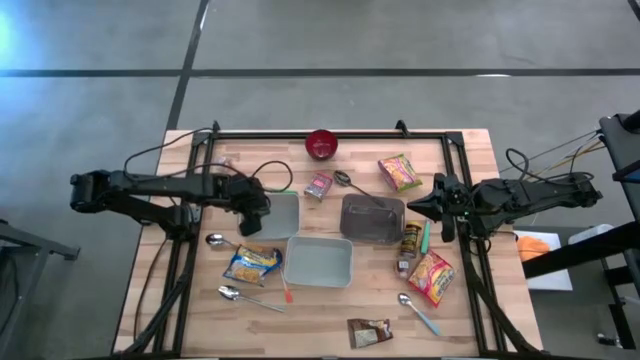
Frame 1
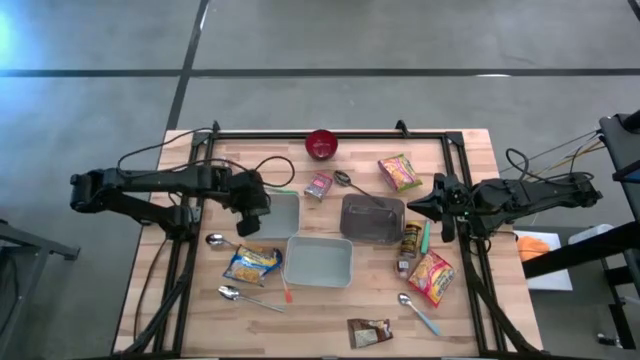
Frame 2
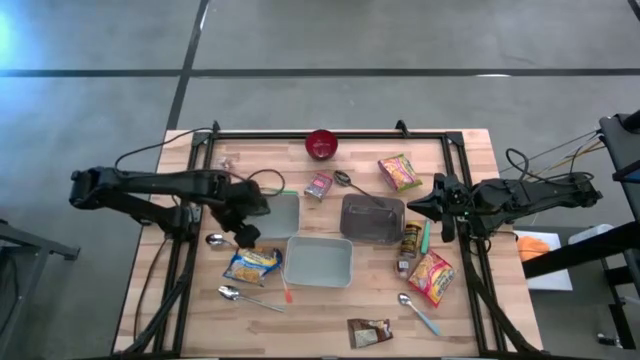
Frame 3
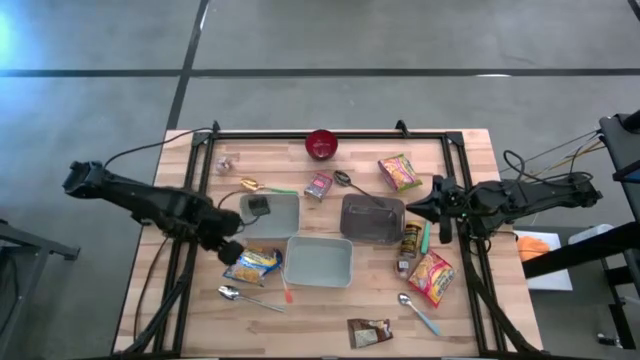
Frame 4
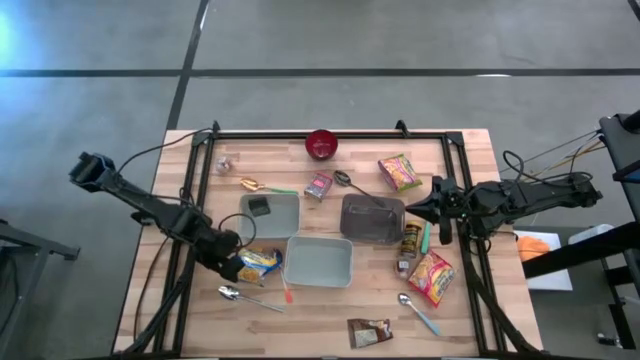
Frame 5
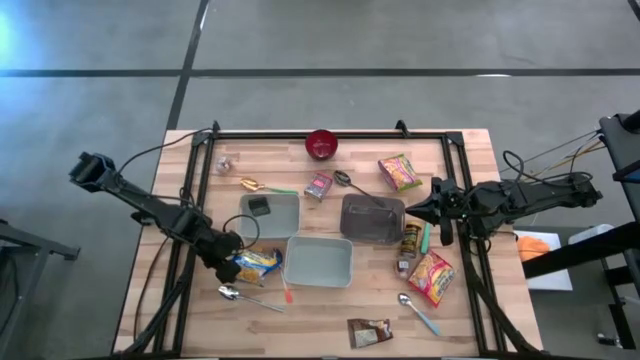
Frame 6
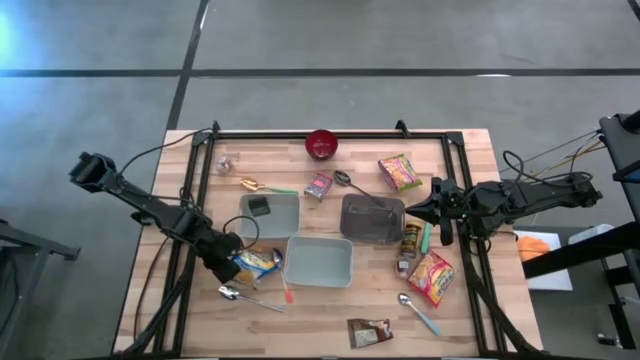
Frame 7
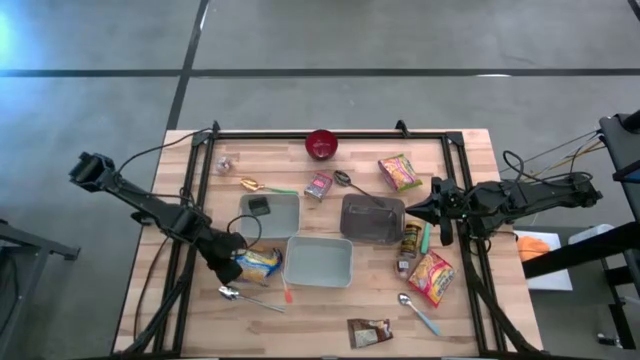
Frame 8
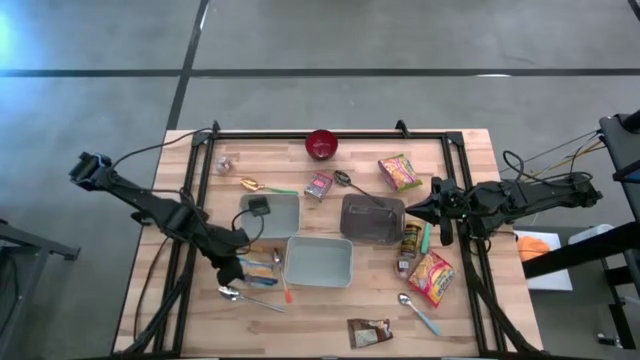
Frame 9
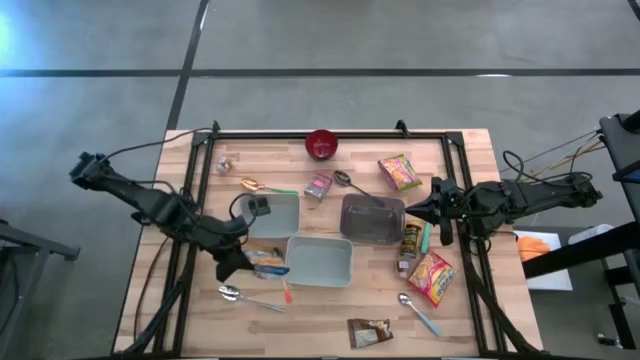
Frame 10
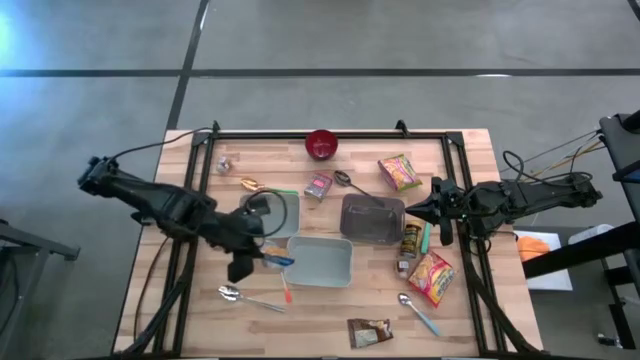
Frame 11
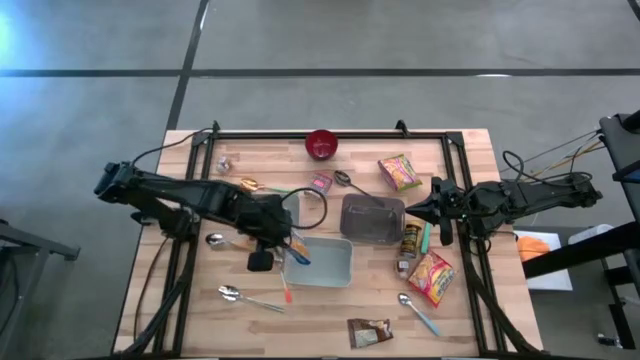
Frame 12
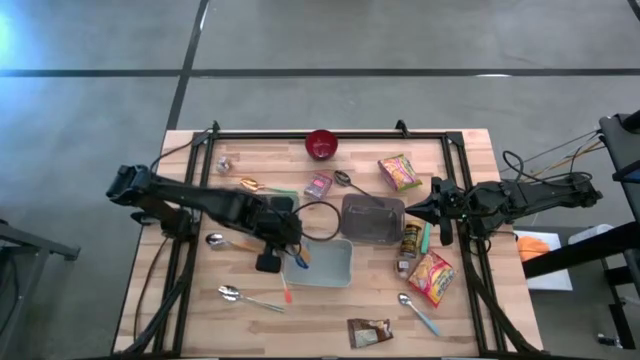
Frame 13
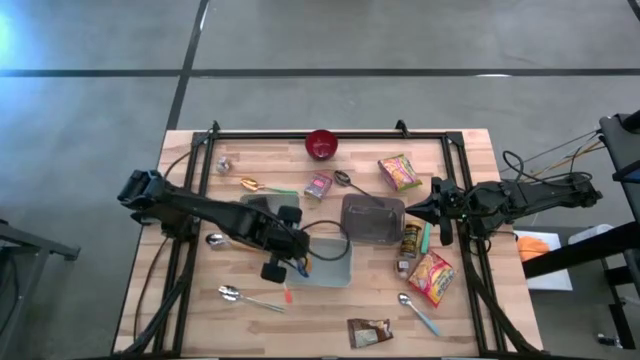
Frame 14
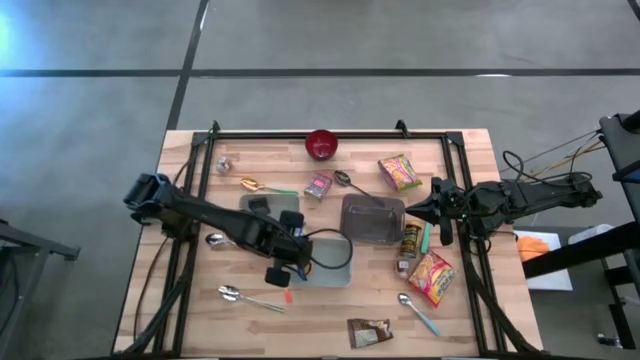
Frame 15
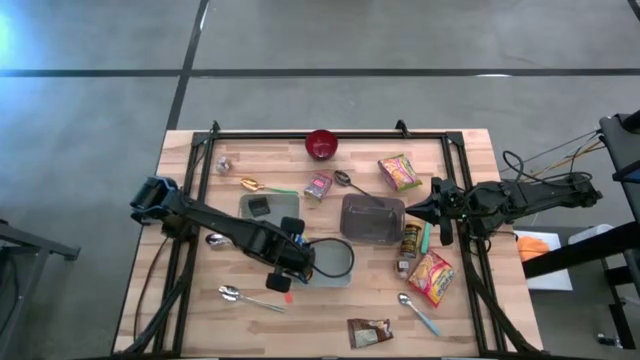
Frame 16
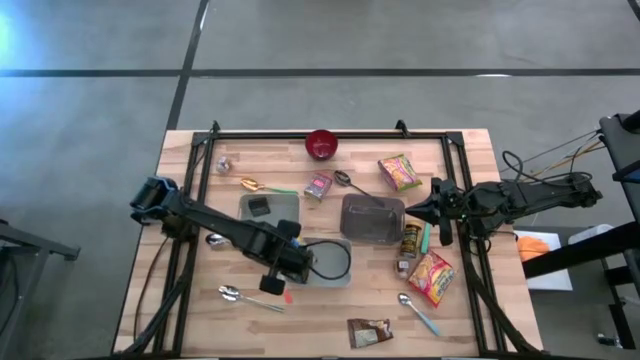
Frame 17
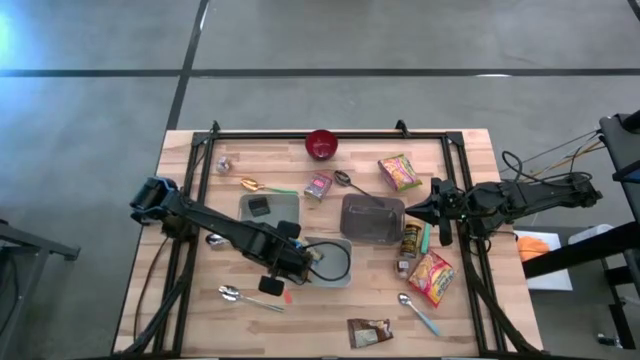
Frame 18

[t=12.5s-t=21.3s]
Put the blue noodle pack into the bottom gray bin

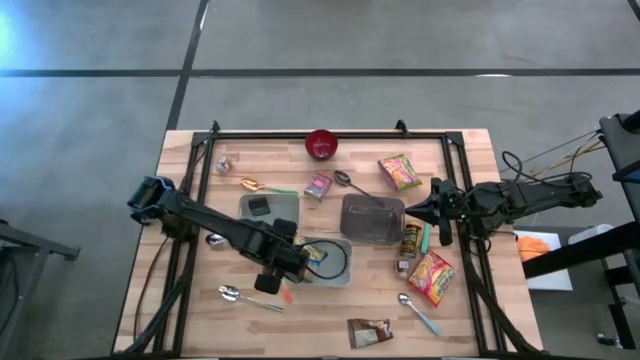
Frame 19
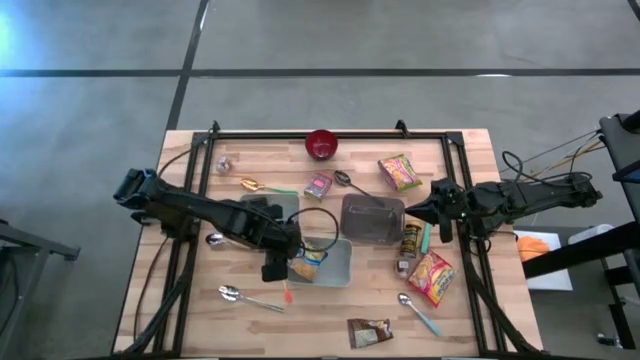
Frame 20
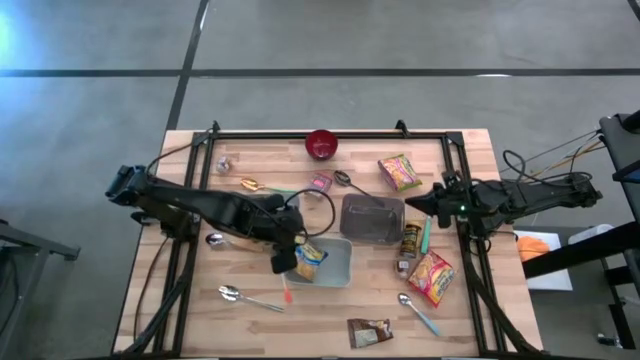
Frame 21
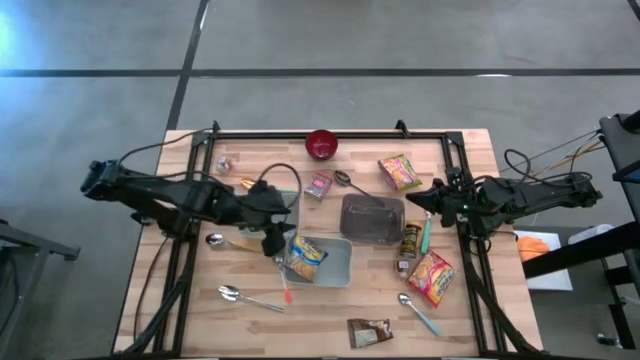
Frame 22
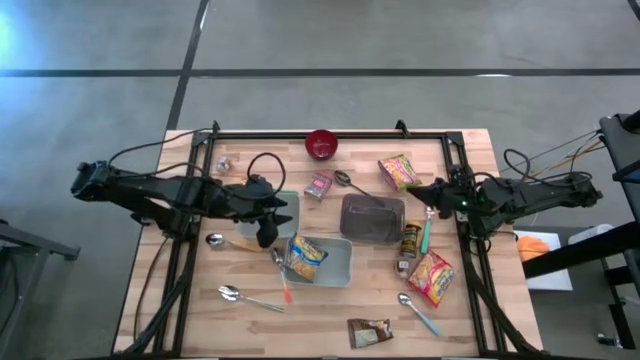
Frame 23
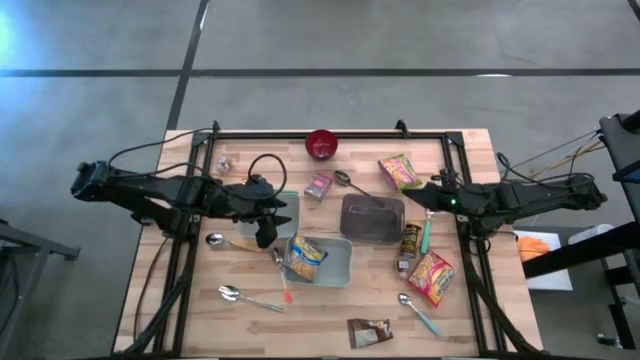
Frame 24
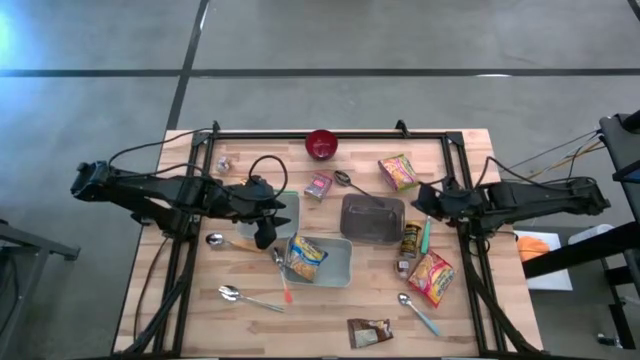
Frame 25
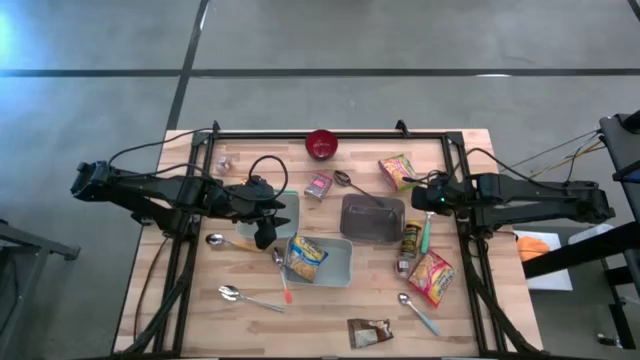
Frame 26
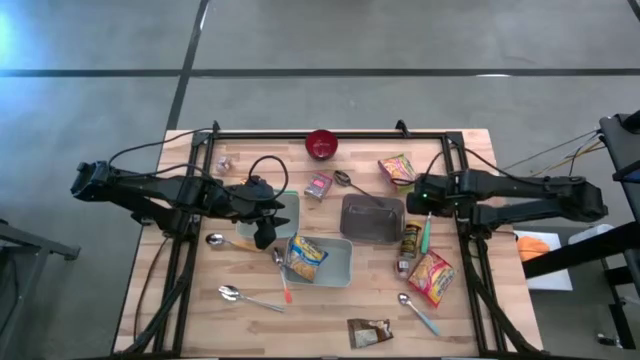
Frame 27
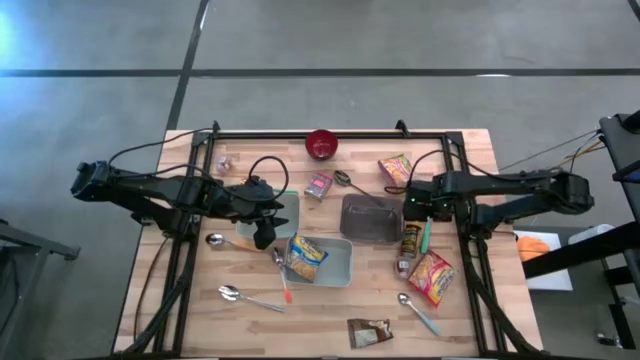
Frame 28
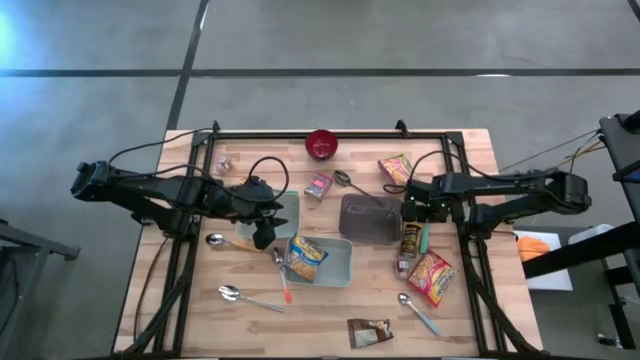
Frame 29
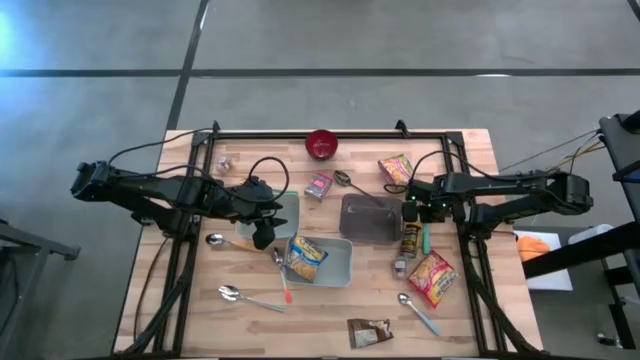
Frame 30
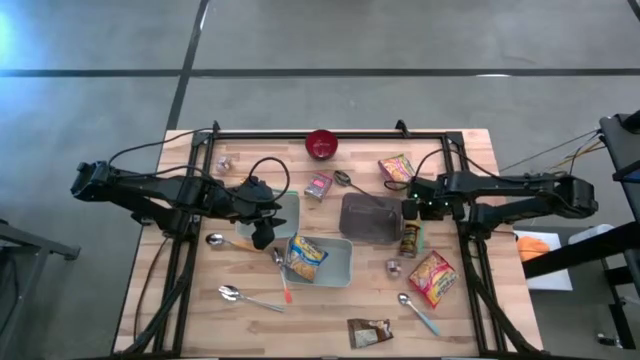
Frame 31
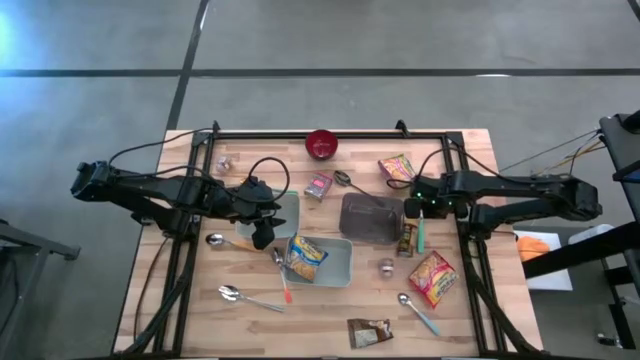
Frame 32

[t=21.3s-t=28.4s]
Put the light green spoon into the black bin

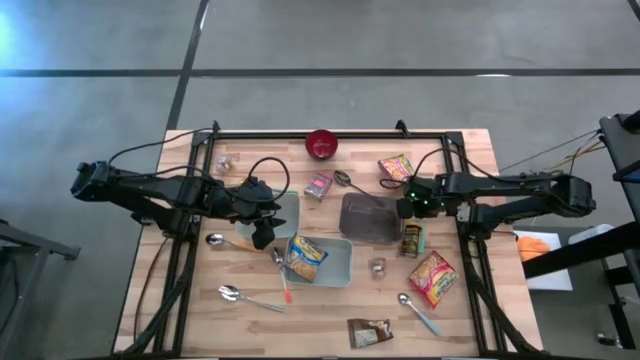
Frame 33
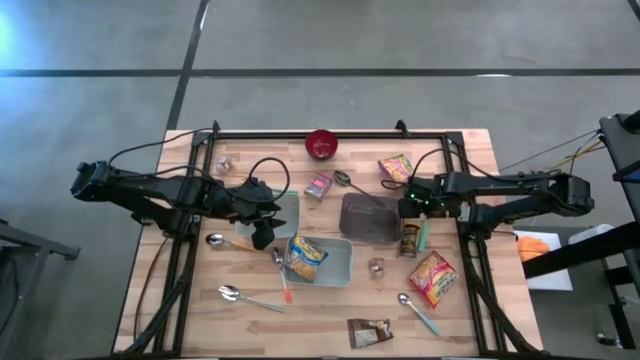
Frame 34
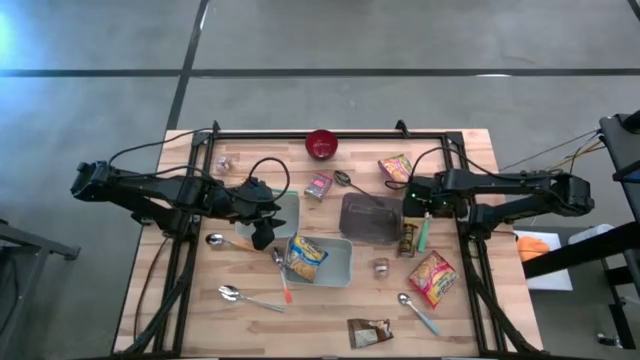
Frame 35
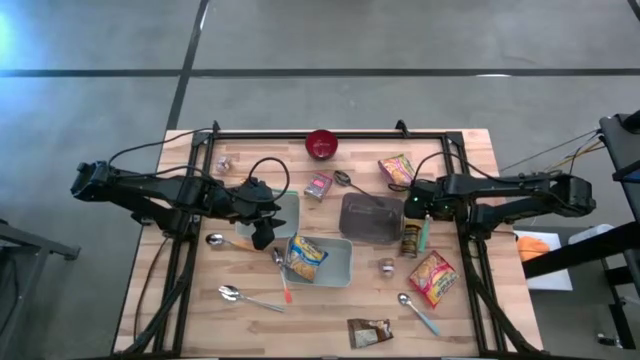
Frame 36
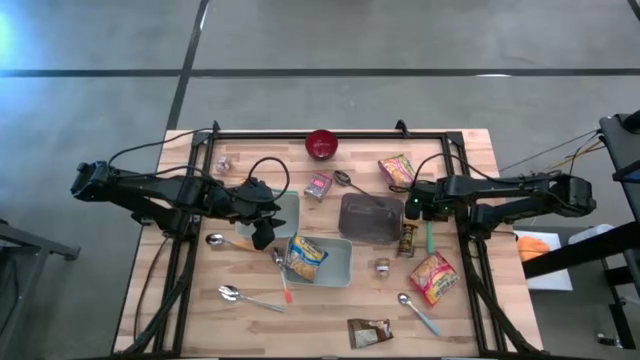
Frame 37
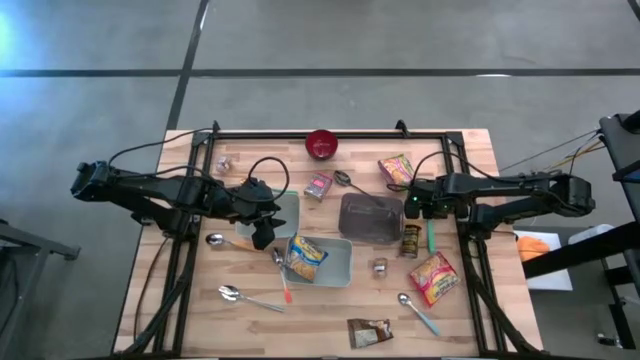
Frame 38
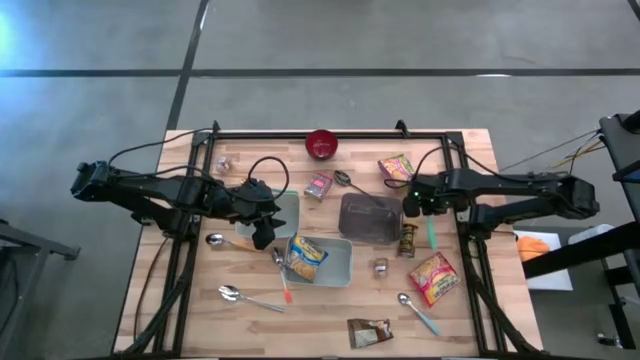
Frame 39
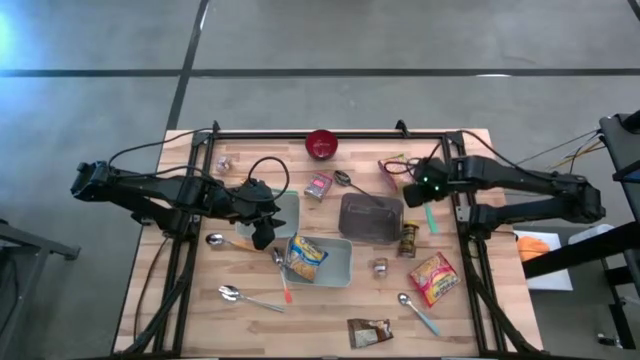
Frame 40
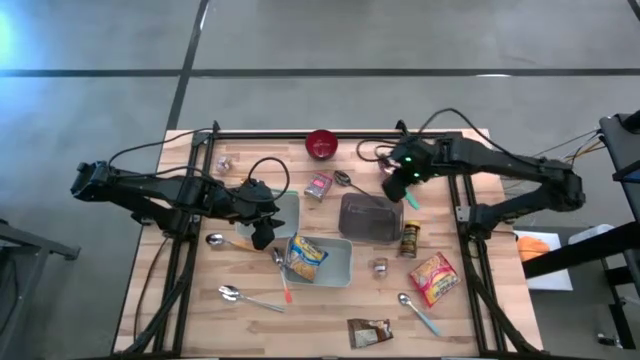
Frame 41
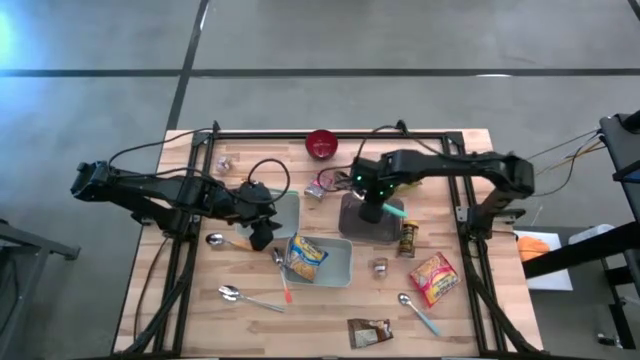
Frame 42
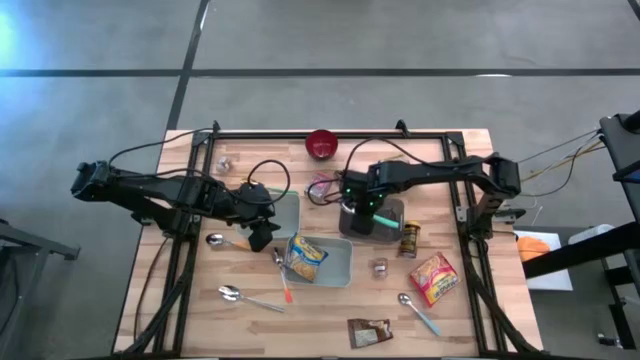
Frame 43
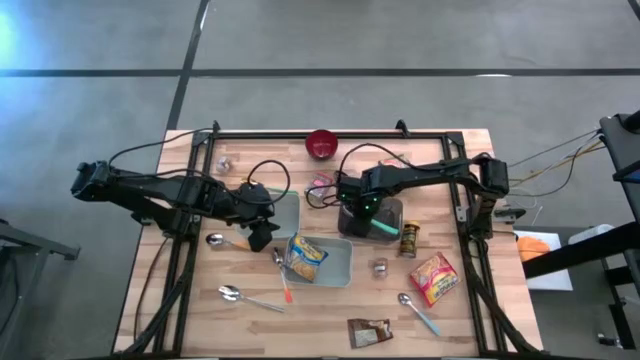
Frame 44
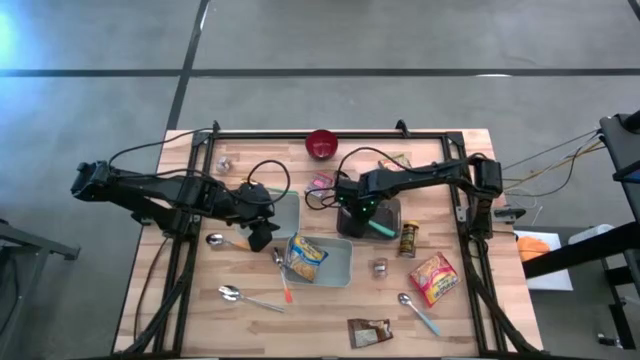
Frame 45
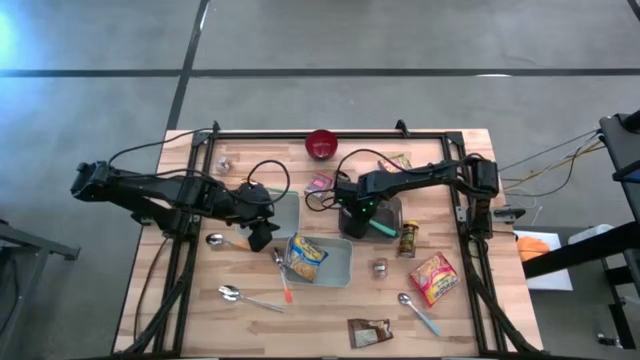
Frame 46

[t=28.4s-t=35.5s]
Put the light green spoon into the black bin
